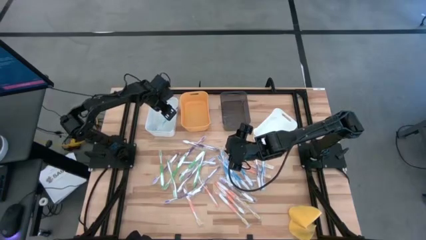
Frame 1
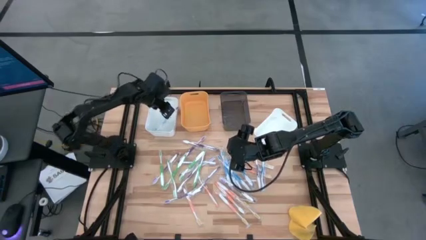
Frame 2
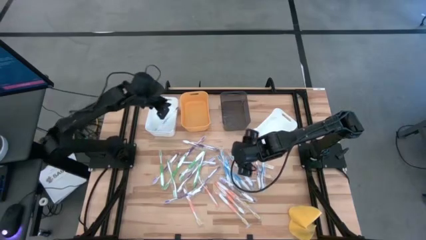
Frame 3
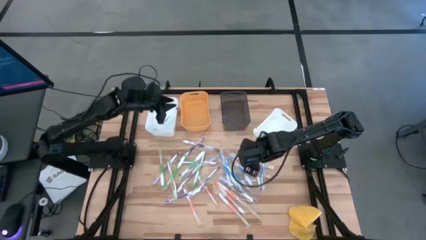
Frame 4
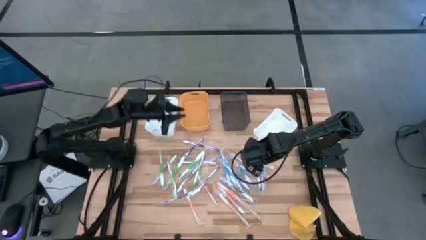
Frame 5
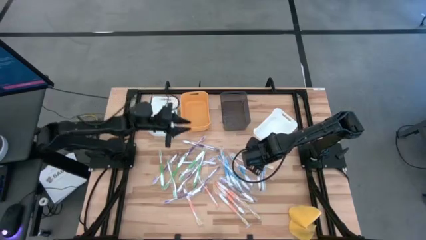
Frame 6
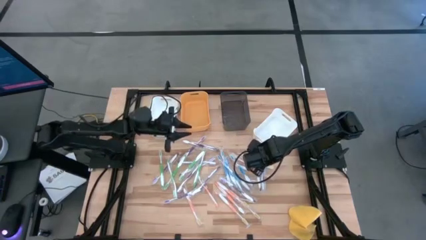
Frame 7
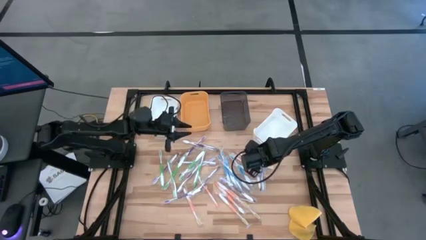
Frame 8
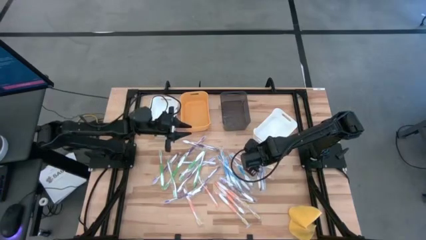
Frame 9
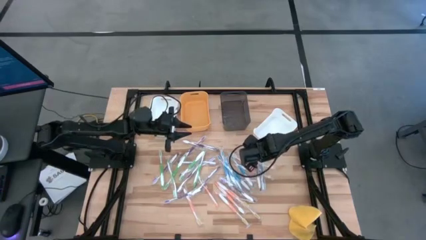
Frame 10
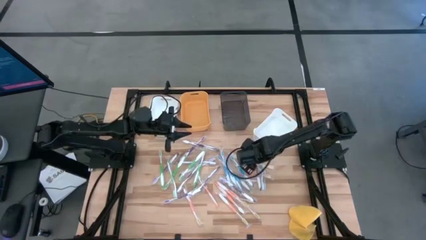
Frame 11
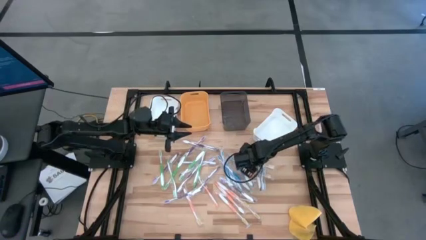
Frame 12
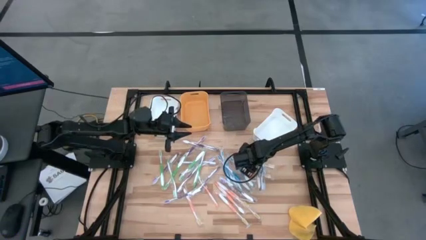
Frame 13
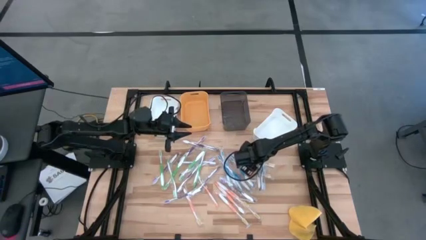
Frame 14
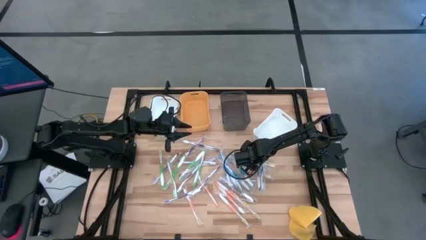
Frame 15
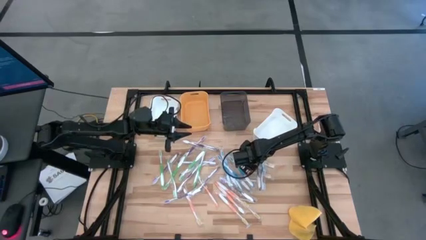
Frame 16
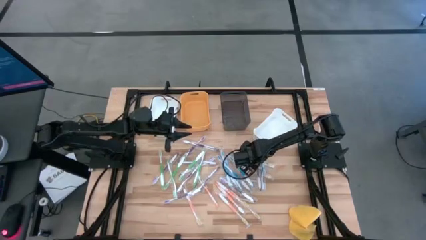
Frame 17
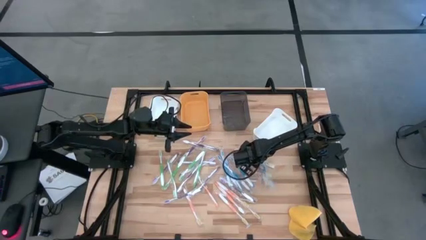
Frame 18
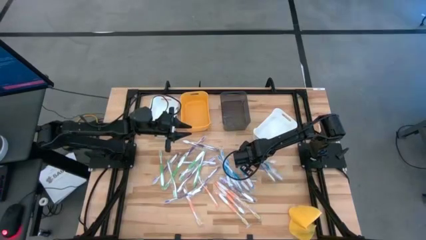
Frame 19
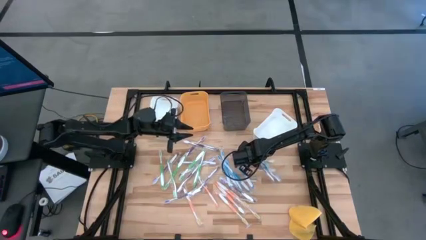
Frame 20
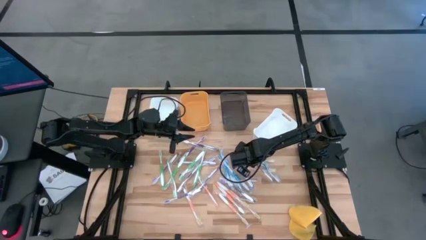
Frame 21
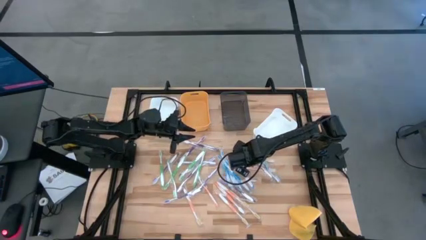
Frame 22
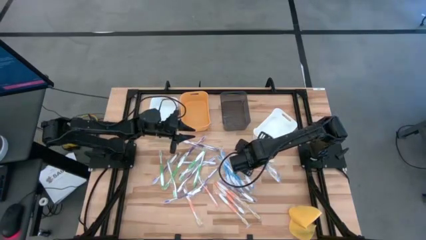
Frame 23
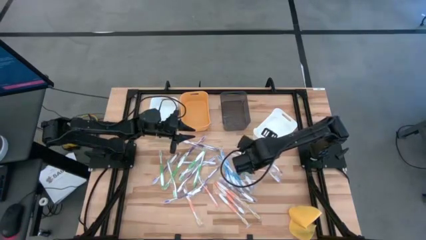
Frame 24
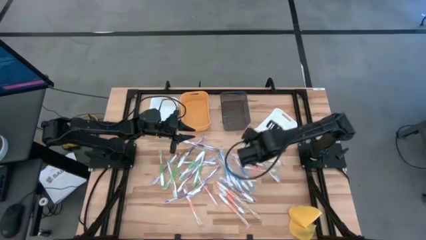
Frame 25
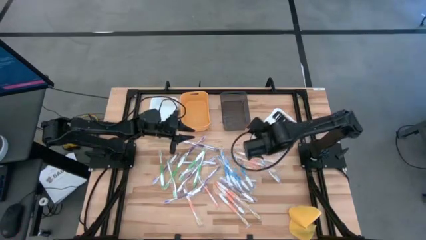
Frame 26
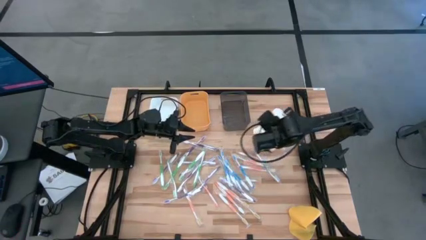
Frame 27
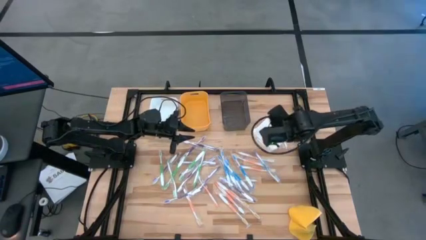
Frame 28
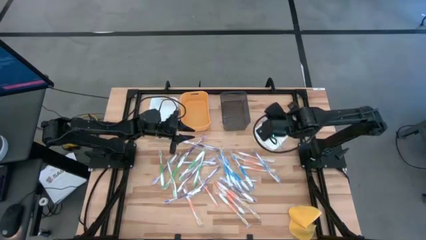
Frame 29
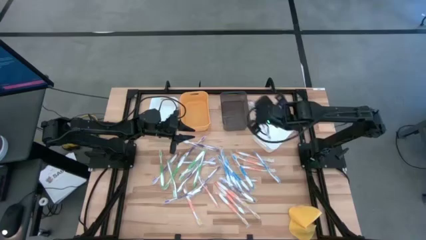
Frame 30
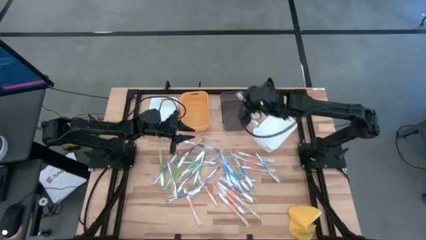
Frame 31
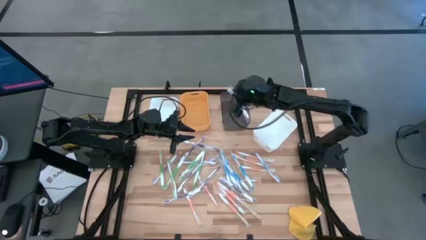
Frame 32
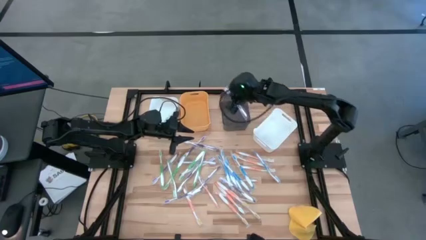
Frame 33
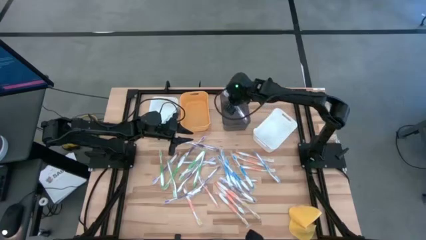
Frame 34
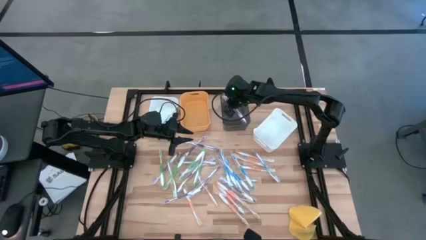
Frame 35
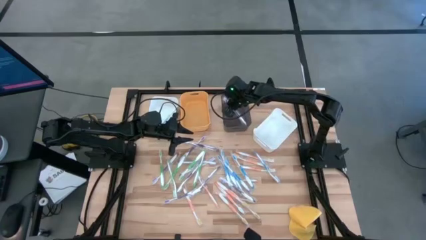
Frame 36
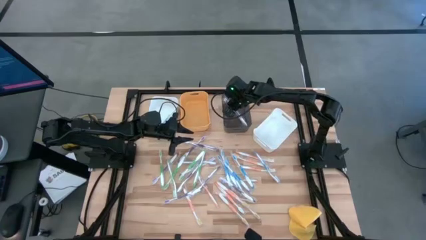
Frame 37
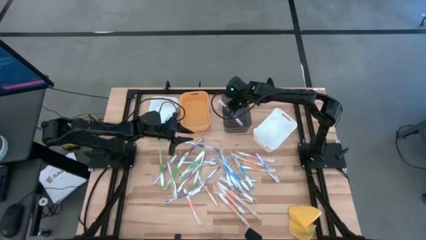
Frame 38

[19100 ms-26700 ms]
Task: Pick & Place Toothbrushes
Put the violet toothbrush into the gray bin

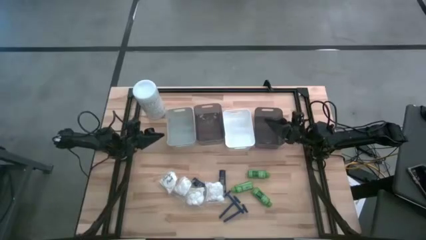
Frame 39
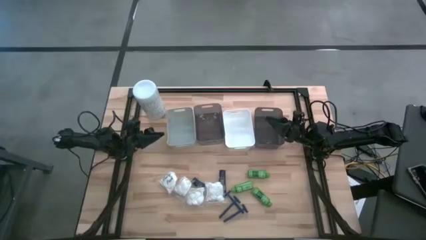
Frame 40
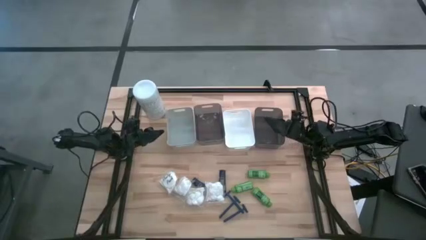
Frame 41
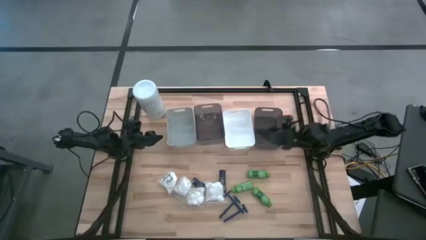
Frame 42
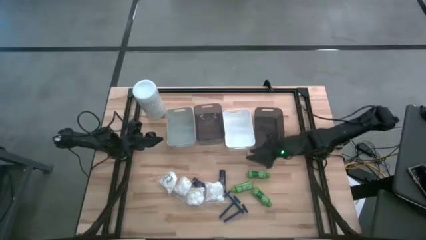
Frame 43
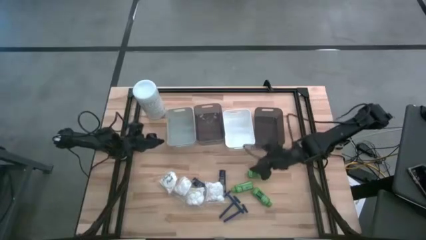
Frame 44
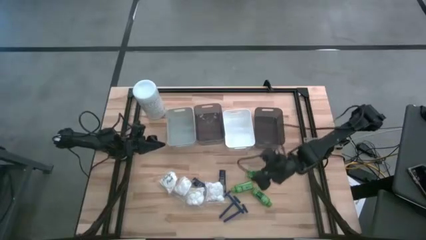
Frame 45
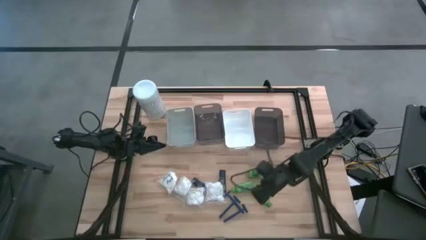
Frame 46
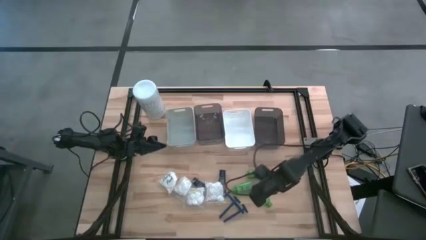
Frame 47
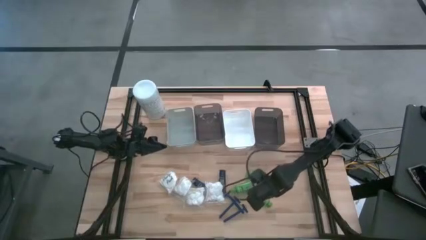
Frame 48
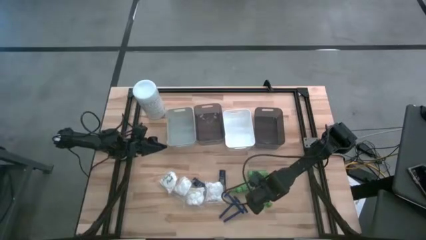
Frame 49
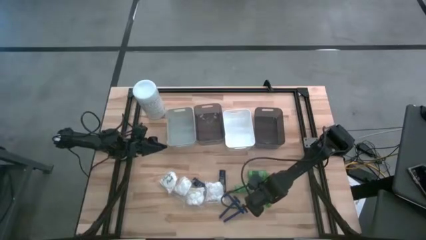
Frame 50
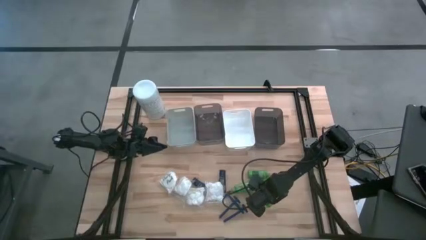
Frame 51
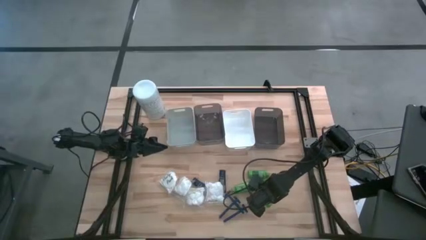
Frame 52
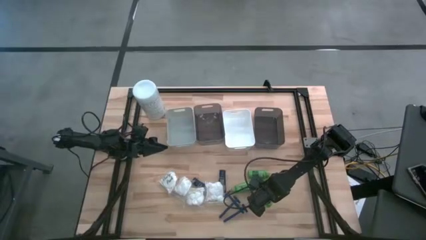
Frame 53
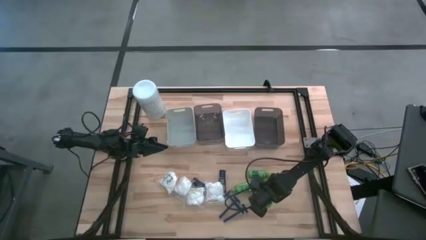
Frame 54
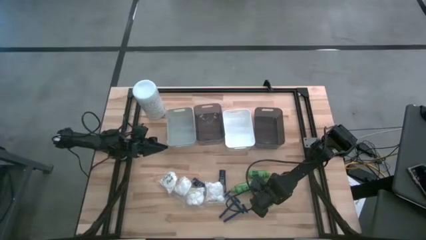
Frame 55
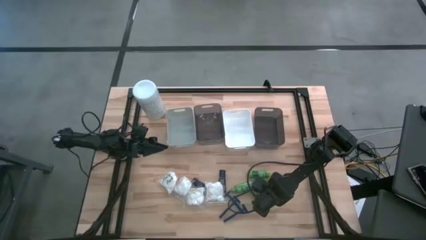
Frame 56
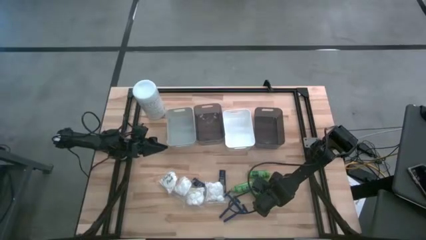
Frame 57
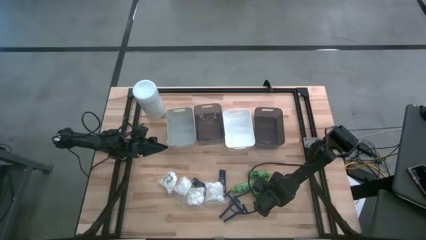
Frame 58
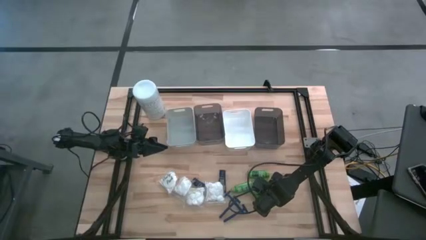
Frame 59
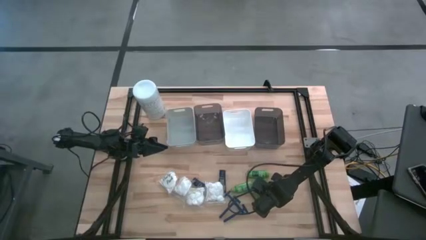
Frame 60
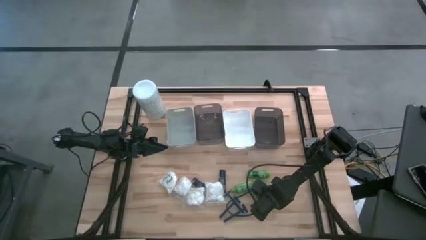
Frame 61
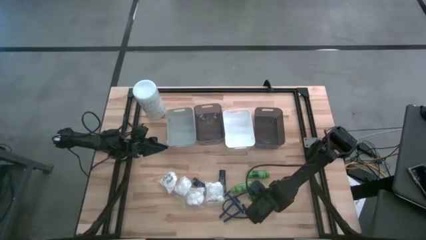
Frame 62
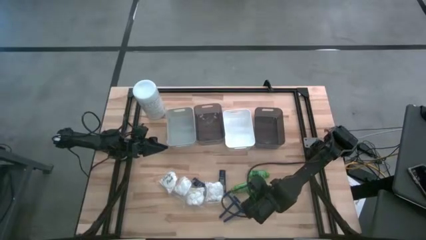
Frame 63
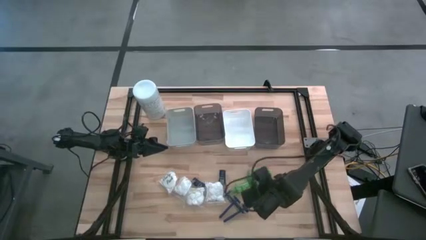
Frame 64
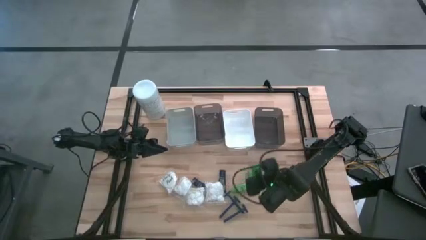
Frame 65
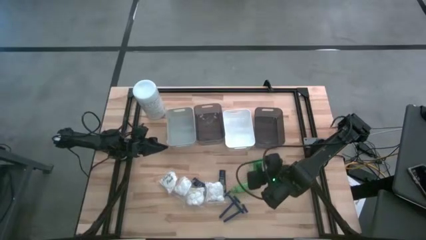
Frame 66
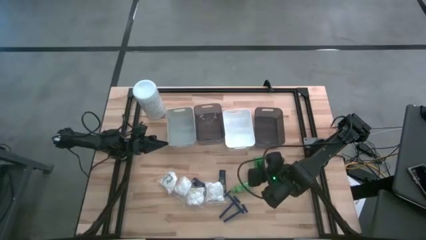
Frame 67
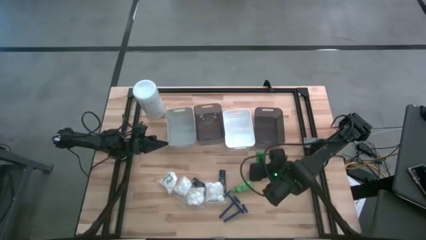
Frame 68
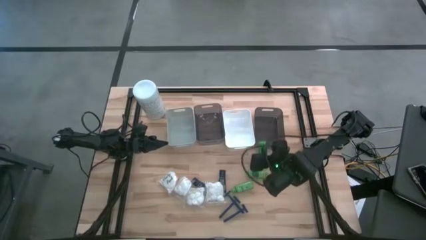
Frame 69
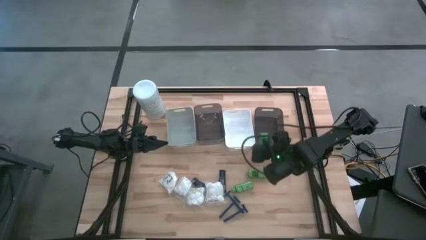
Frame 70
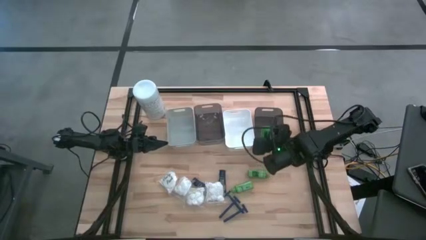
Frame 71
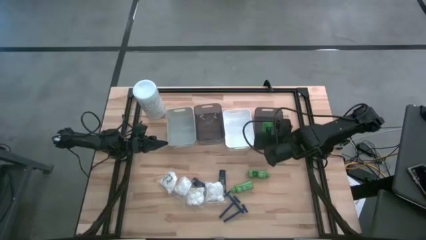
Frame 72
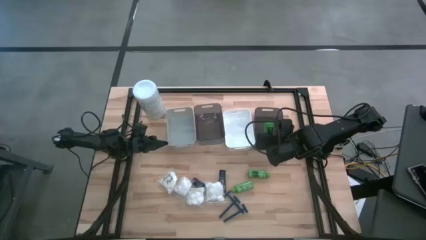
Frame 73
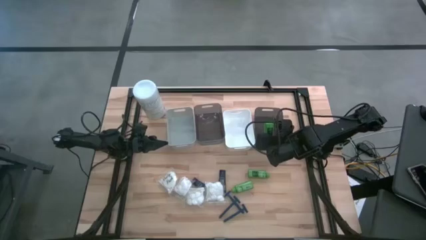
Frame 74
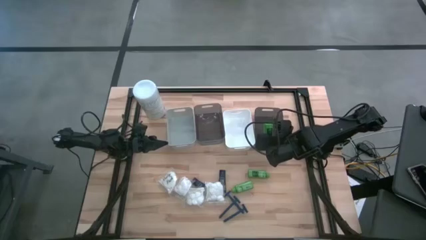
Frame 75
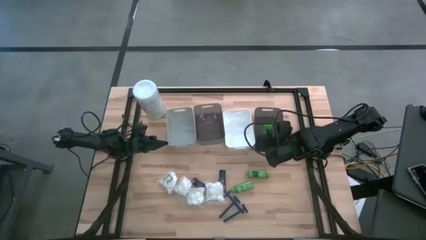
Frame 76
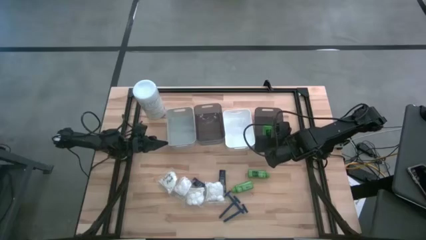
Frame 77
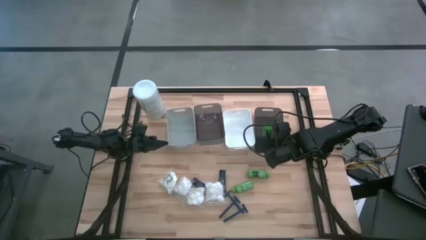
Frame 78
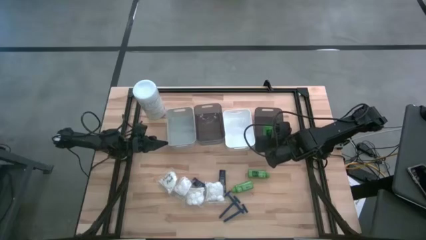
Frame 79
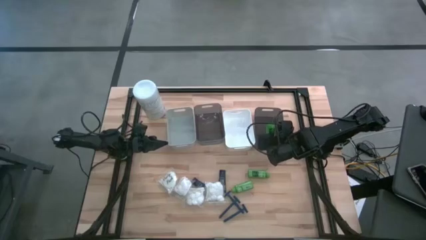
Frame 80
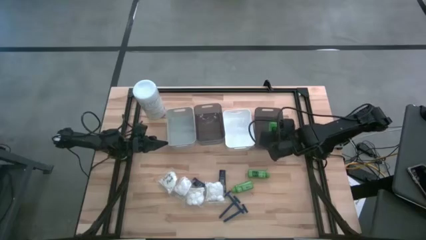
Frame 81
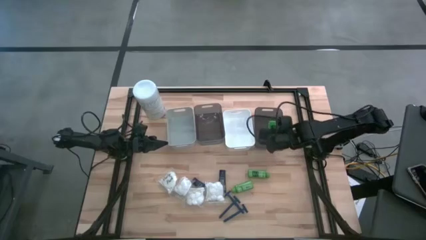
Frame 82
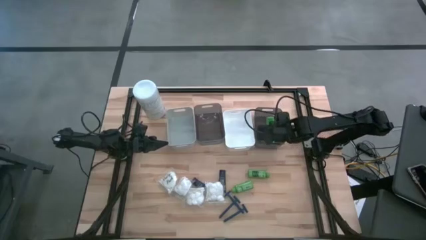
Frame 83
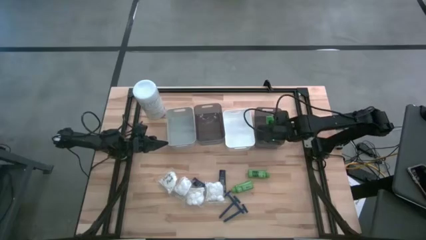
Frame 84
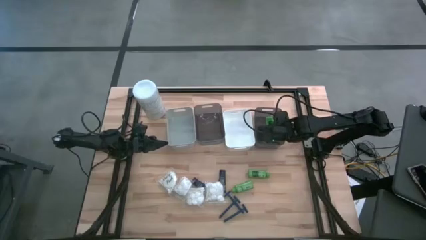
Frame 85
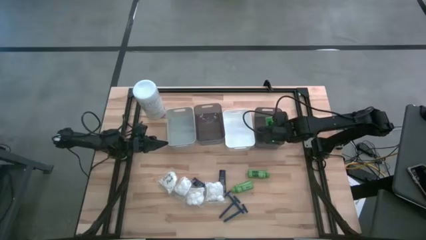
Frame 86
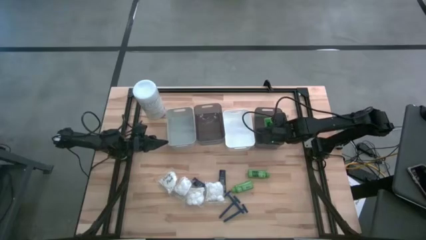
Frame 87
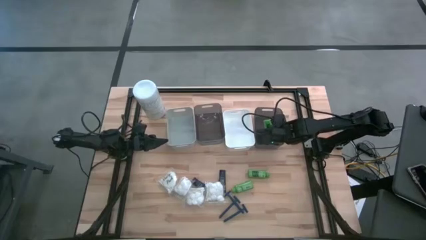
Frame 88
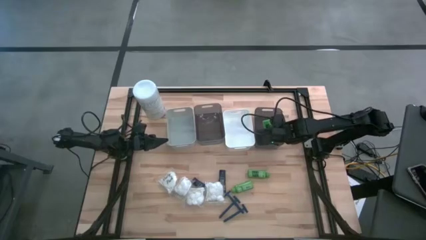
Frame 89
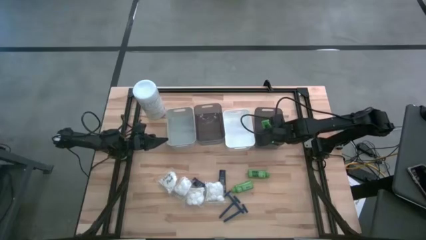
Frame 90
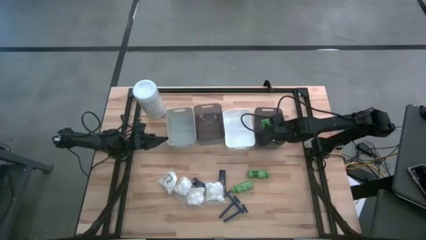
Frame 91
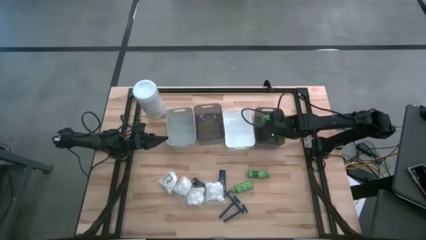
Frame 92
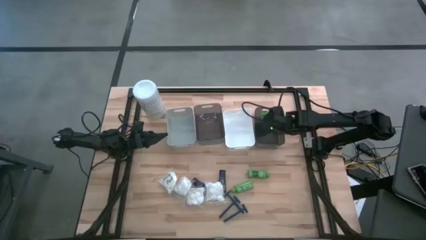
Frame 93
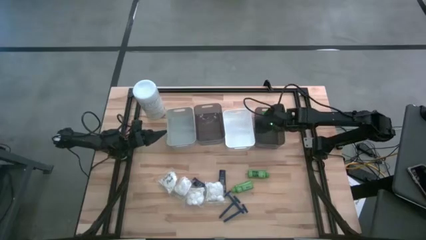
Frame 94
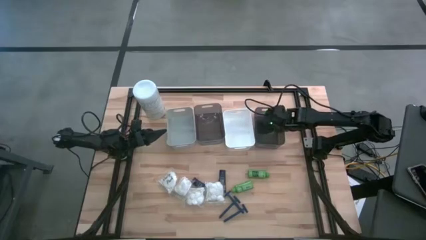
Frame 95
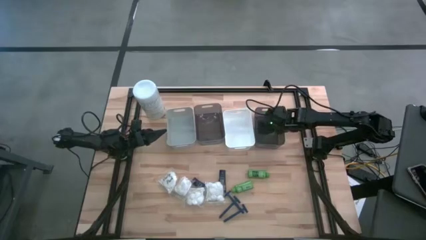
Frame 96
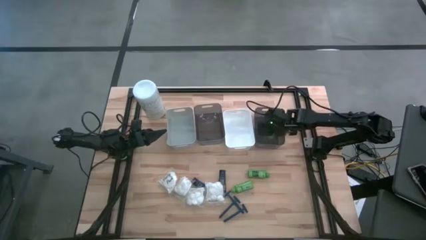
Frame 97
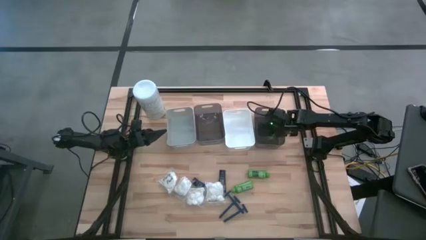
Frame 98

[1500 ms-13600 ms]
Task: Pick & Place Travel size toiletries
Put the bottom right shampoo in the right black bin
